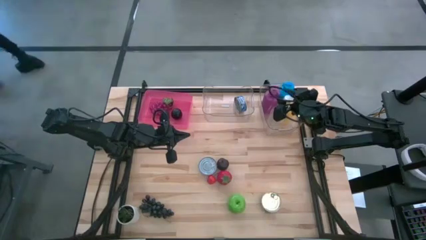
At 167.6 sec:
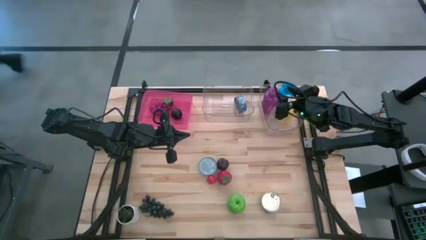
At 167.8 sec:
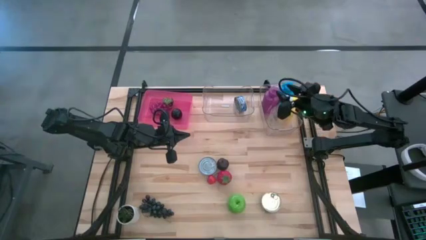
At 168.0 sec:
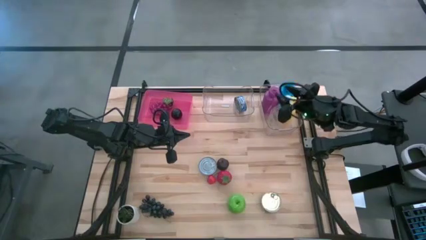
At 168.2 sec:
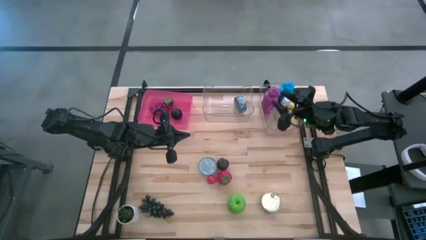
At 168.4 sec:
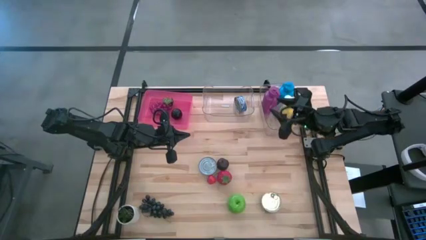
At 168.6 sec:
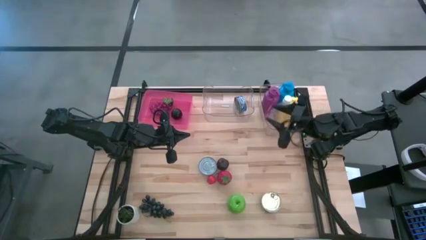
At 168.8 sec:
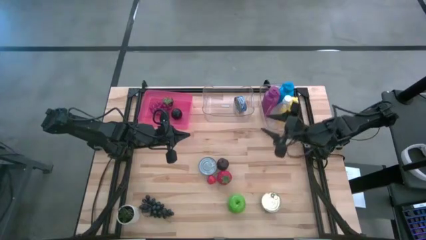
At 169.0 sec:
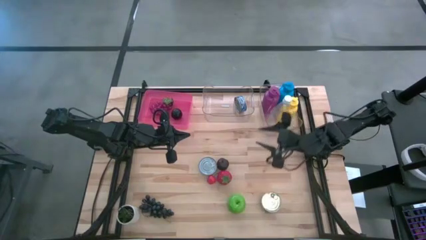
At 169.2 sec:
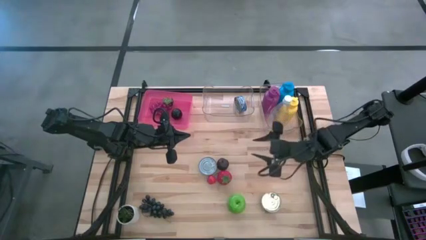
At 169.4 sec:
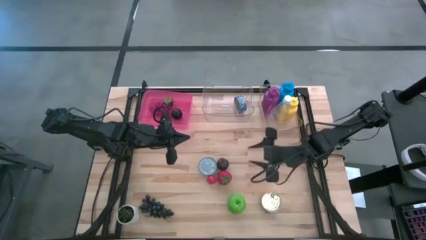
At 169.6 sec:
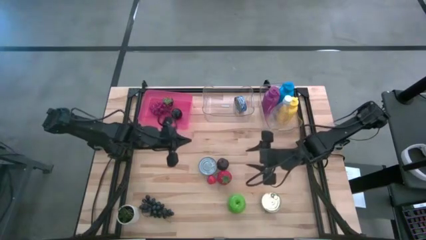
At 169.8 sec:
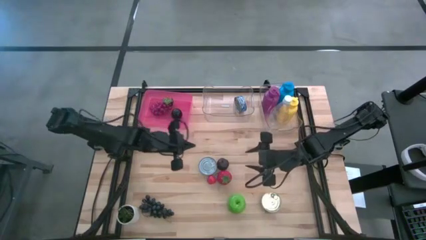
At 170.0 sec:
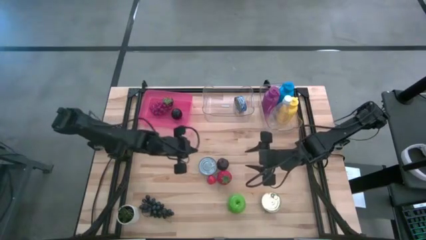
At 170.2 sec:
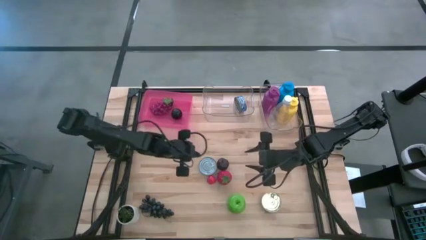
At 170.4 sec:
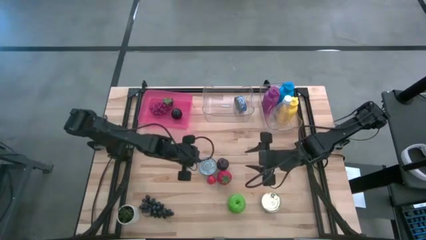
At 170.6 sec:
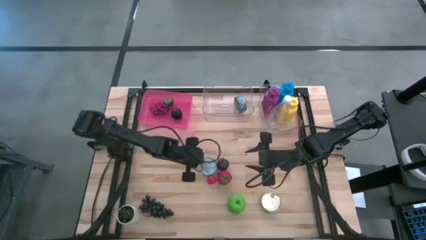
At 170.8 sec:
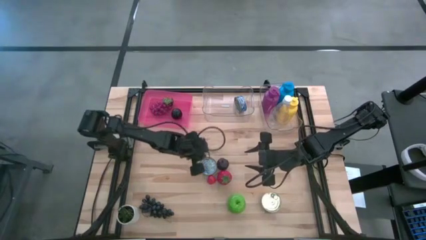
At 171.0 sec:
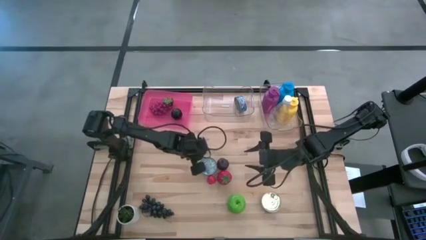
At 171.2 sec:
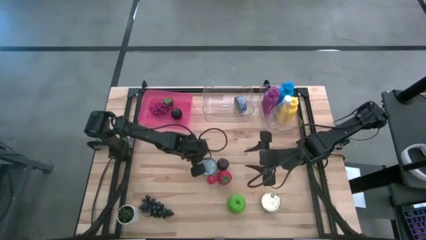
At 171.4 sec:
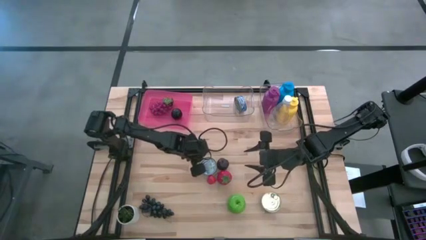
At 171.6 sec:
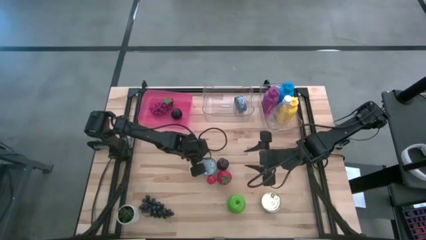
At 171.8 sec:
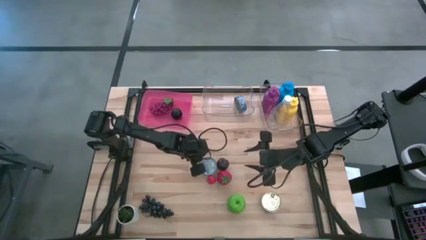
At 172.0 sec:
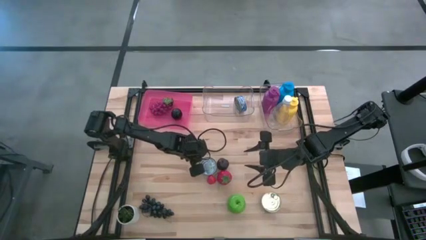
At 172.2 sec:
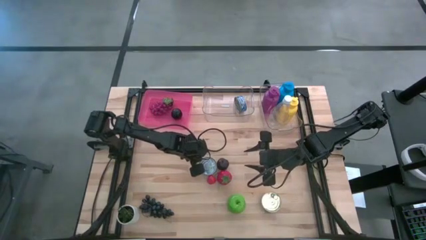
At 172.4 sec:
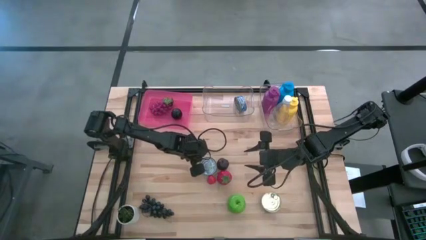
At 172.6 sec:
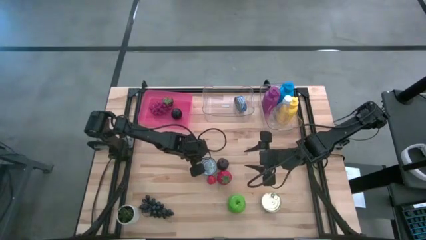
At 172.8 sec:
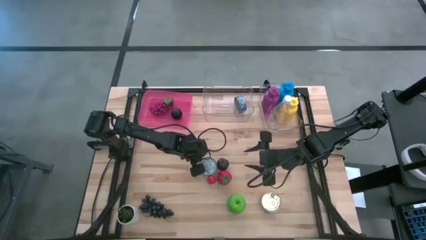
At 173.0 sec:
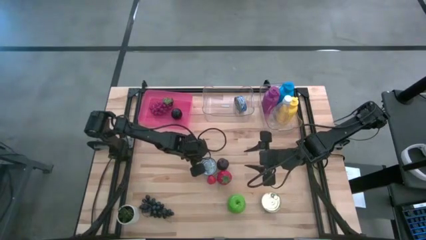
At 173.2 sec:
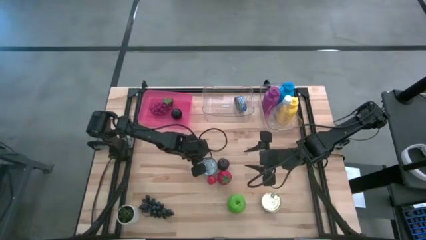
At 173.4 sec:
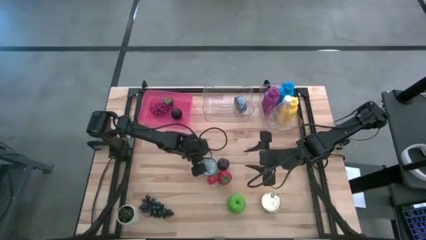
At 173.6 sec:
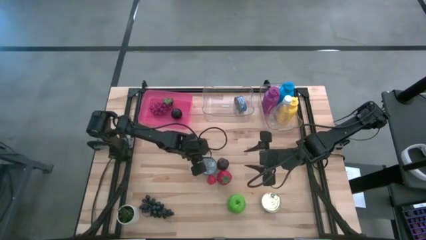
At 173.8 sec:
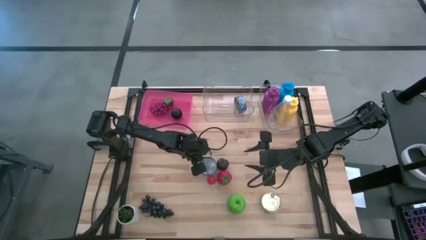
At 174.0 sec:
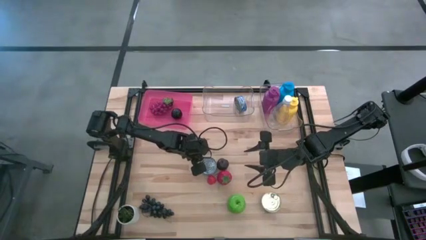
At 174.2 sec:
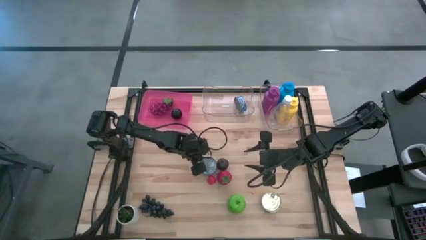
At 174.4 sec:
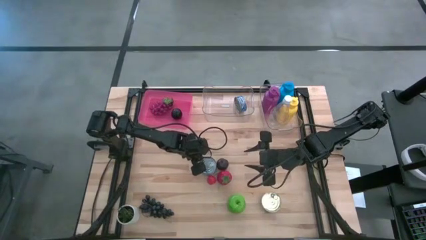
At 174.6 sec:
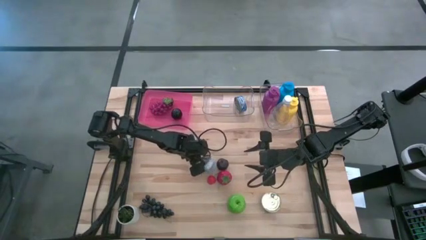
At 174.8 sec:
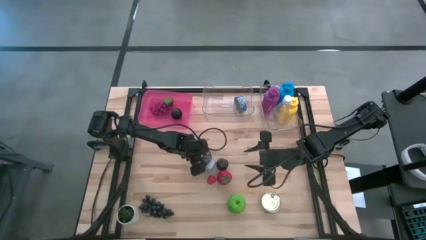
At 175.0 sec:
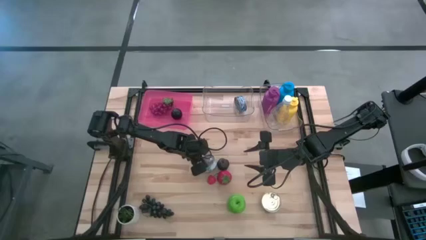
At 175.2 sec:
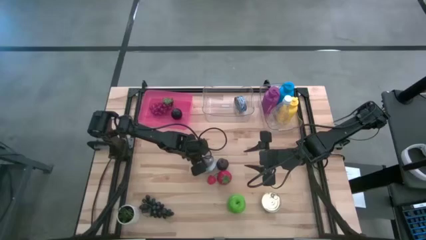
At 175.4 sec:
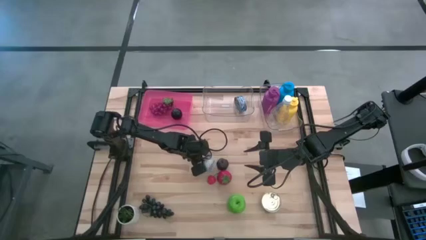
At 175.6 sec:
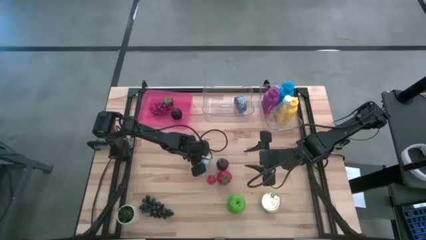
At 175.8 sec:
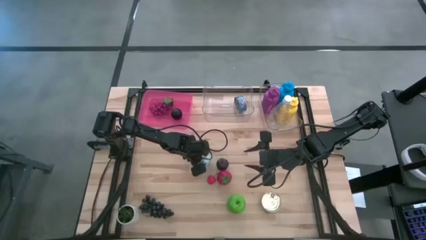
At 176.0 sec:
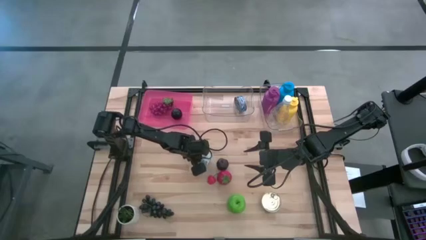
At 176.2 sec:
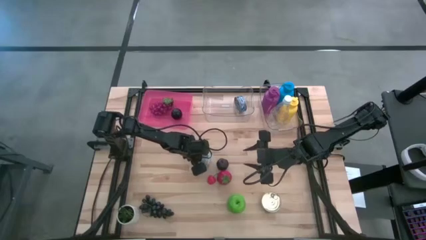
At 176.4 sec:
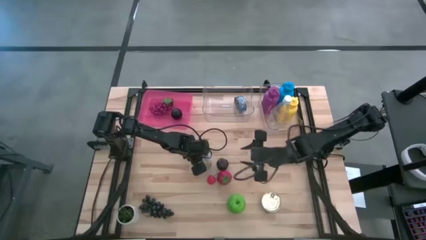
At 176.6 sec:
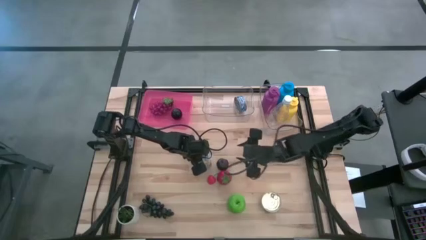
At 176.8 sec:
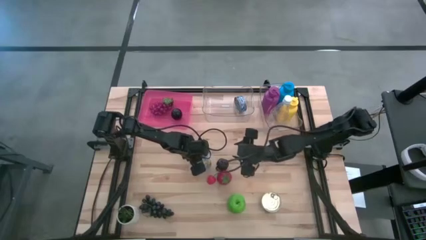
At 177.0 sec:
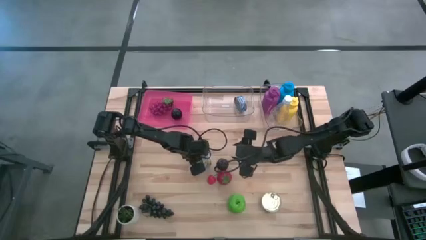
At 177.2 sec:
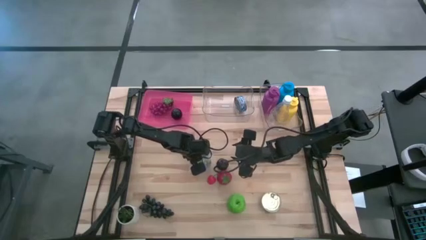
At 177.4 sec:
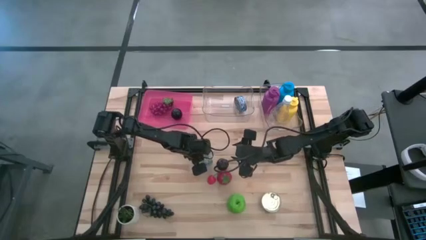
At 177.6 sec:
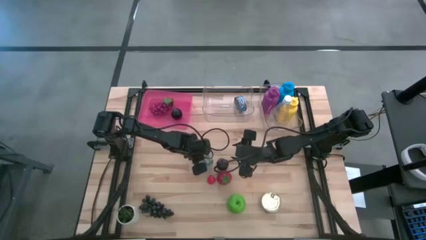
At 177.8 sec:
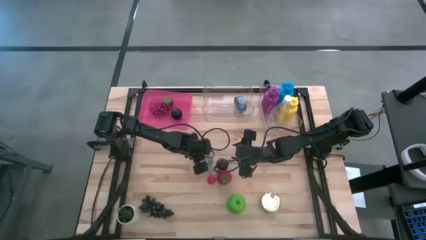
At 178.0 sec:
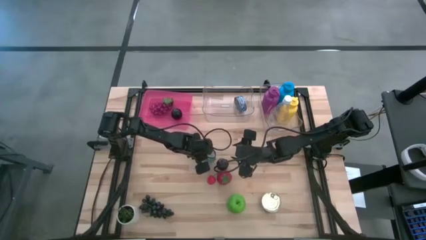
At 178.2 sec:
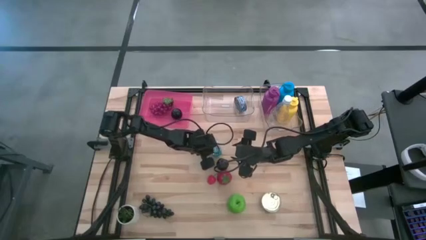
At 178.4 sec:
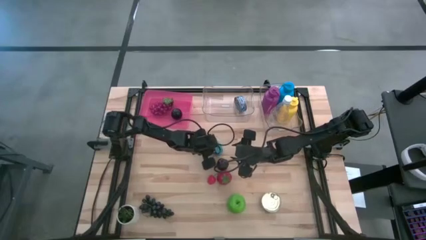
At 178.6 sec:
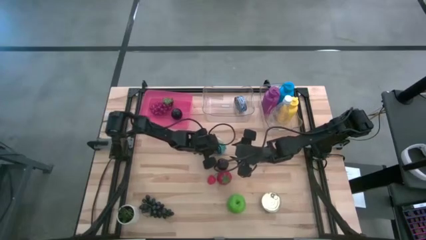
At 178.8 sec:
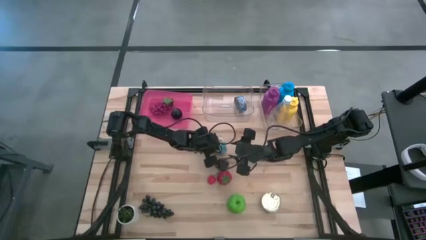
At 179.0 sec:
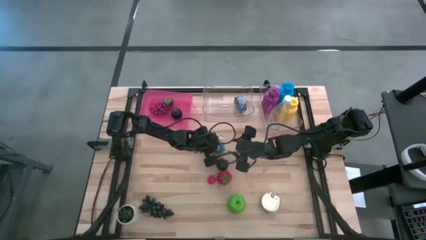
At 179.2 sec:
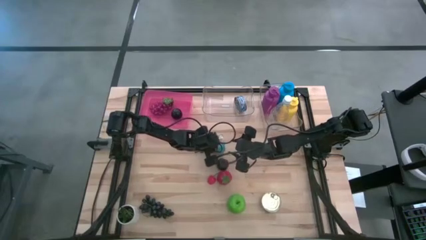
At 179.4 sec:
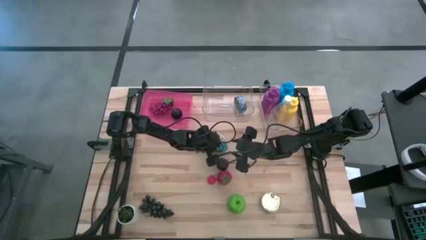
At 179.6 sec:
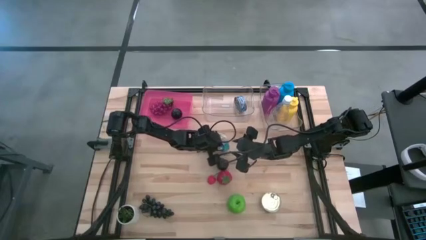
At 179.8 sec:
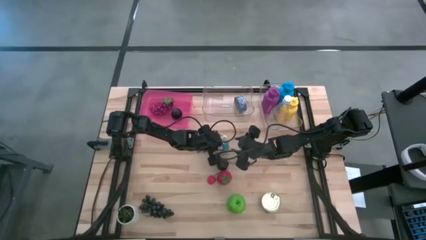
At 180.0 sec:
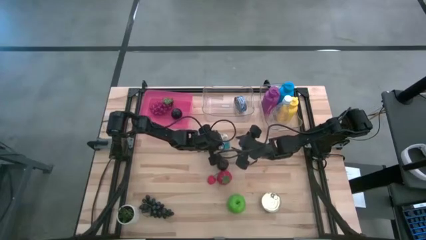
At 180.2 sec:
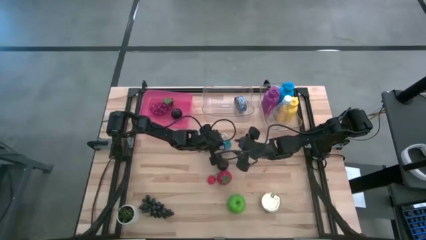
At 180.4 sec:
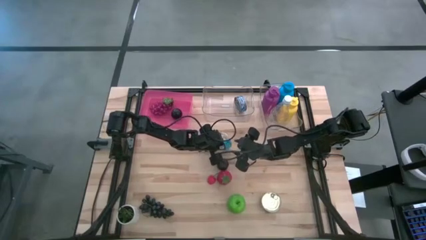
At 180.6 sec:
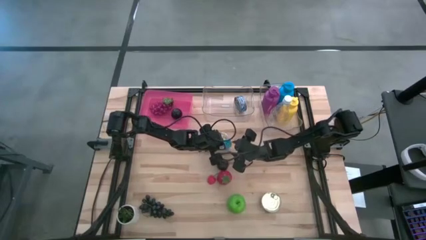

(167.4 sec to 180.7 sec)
Task: Pick & Place Food Item
Put the light blue tuna can into the left transparent bin

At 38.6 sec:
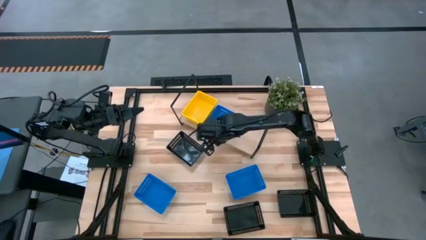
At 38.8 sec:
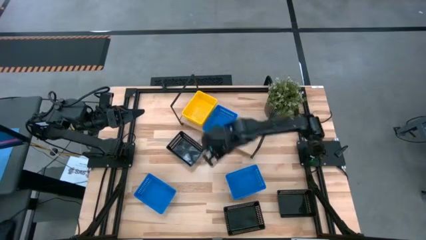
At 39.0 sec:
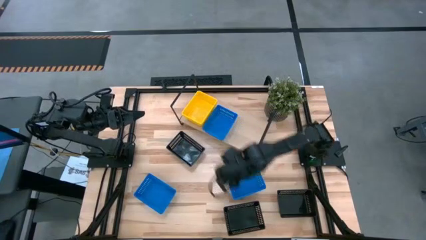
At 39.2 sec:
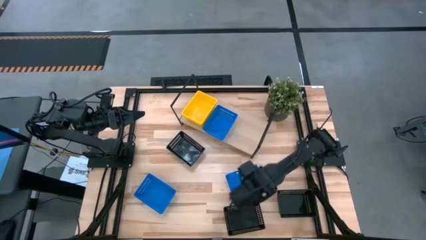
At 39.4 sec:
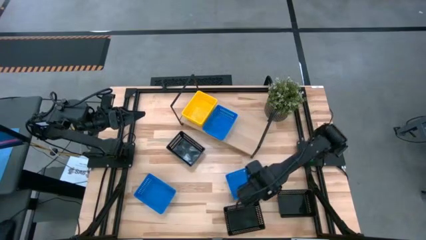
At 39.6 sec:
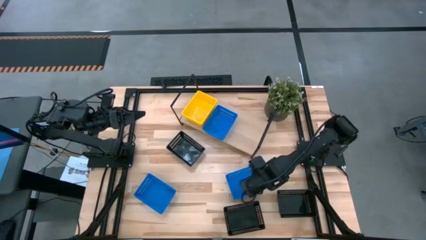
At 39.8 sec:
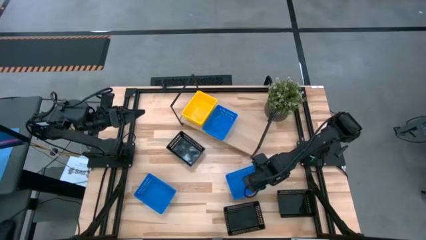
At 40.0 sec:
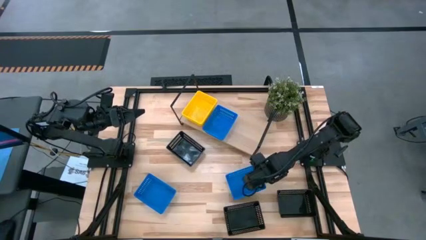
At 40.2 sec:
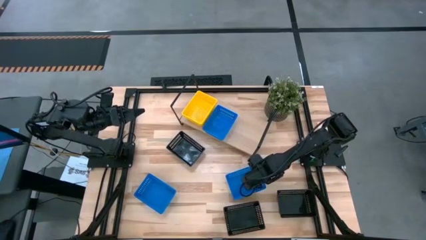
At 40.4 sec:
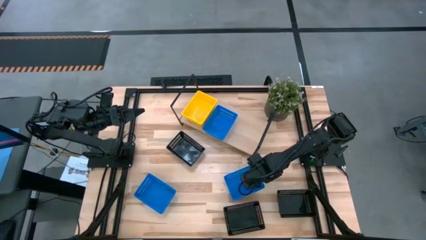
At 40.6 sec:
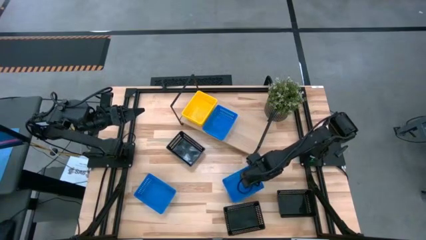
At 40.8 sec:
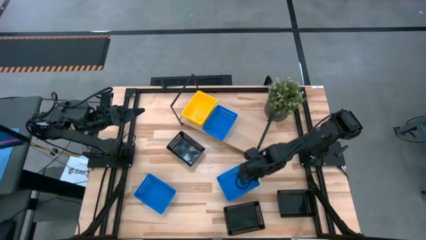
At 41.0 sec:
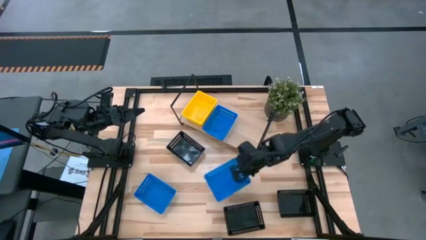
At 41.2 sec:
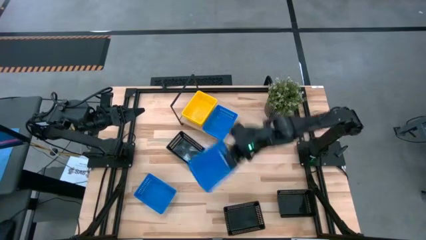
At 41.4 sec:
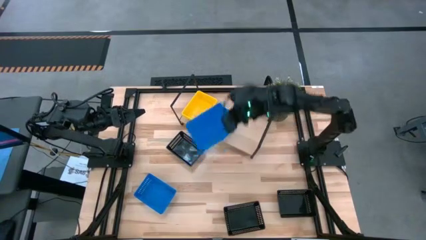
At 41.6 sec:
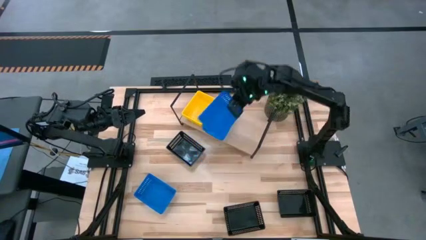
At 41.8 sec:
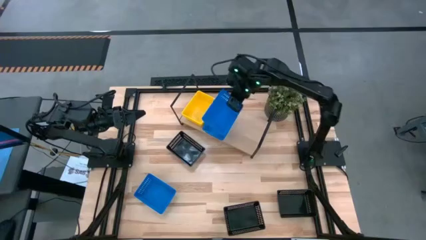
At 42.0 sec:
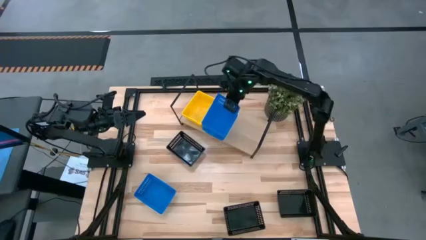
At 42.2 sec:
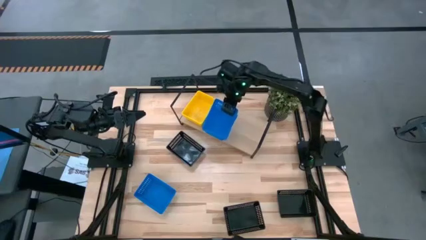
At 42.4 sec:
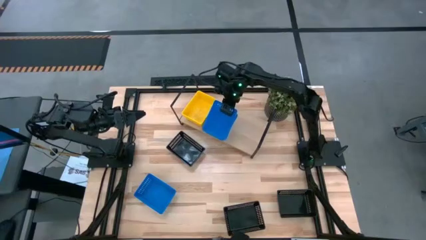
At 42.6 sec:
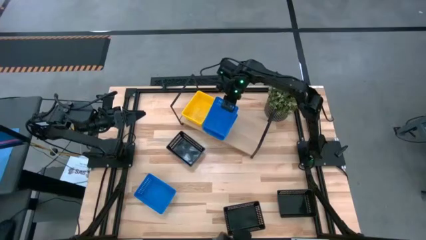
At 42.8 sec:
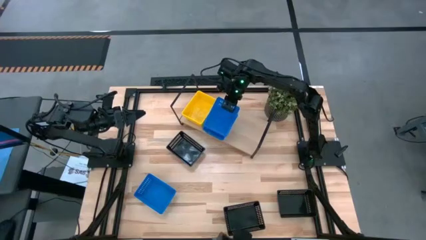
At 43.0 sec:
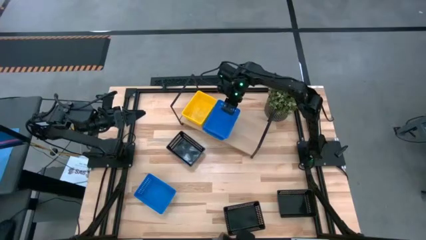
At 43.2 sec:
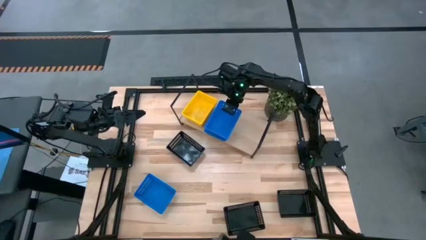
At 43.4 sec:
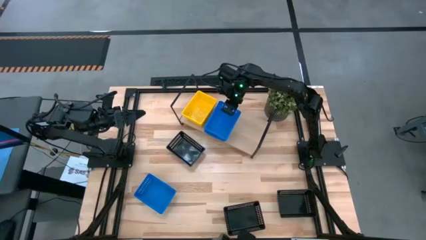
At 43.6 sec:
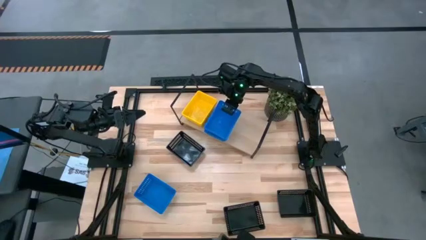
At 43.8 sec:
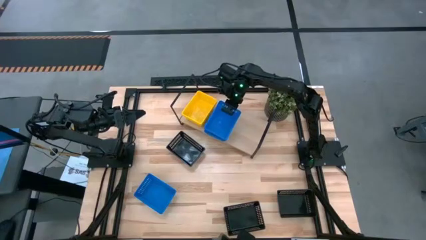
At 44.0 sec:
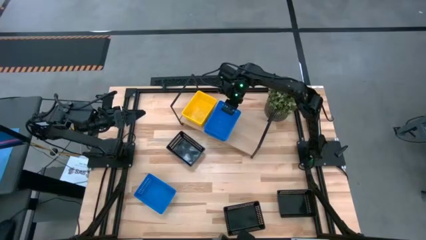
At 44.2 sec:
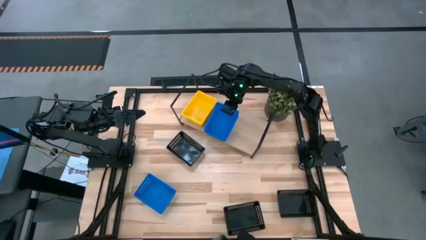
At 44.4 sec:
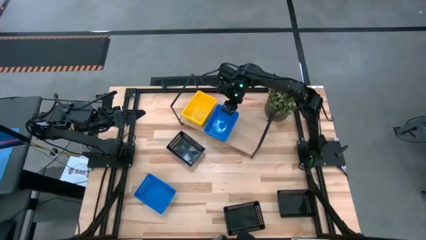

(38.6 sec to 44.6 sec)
Task: Stack baskets on shelf by color
Stack the right blue bin on the top of blue bin on the shelf
